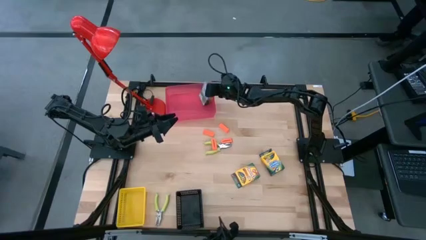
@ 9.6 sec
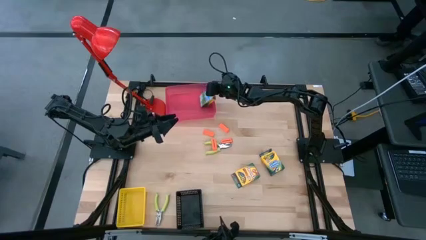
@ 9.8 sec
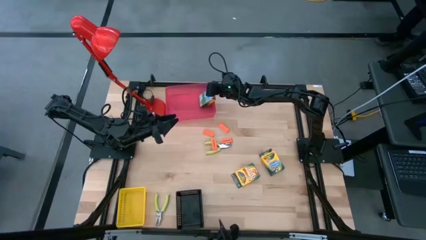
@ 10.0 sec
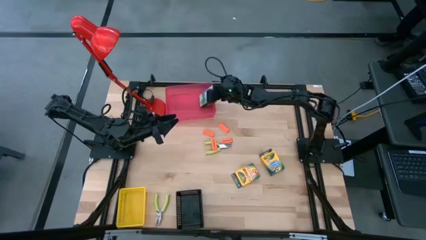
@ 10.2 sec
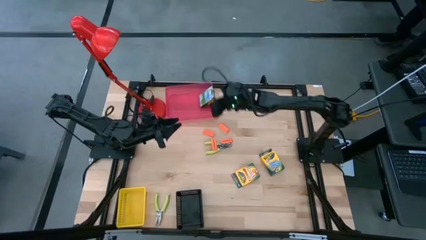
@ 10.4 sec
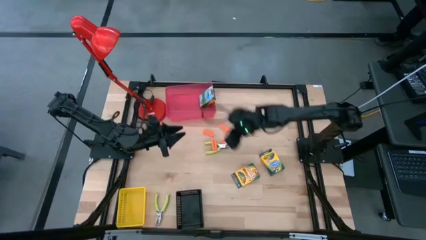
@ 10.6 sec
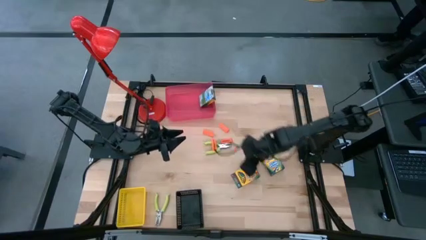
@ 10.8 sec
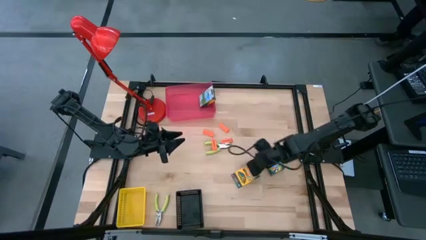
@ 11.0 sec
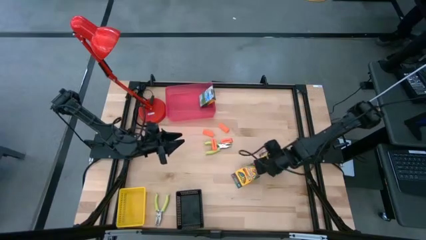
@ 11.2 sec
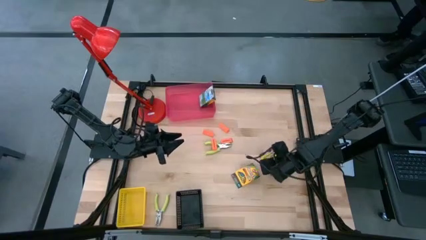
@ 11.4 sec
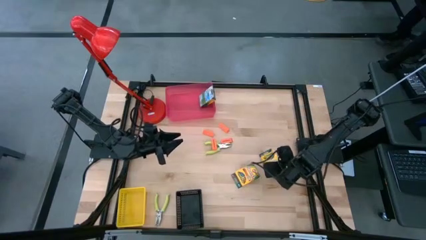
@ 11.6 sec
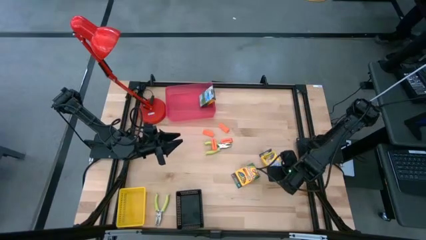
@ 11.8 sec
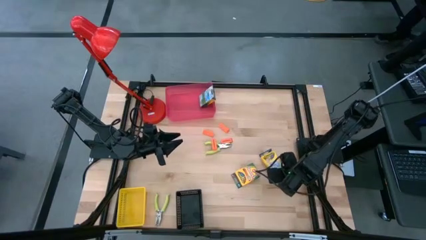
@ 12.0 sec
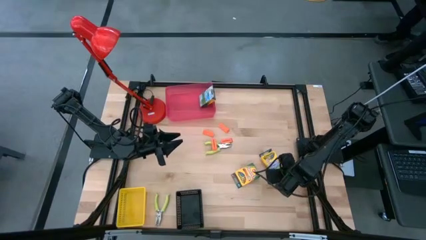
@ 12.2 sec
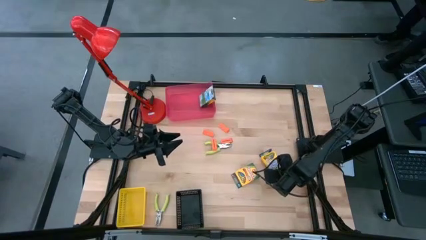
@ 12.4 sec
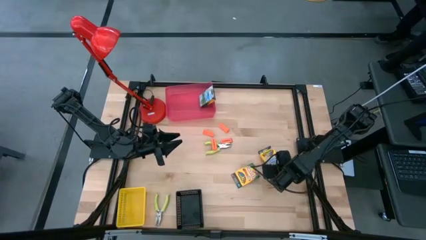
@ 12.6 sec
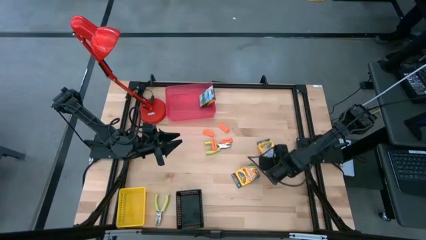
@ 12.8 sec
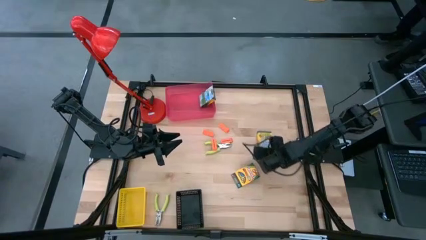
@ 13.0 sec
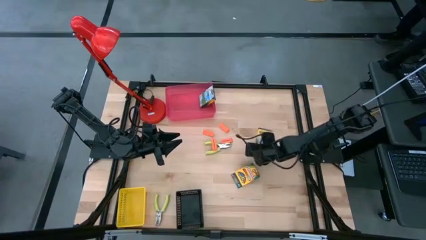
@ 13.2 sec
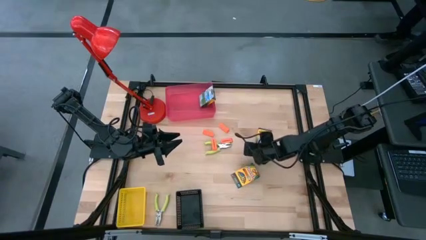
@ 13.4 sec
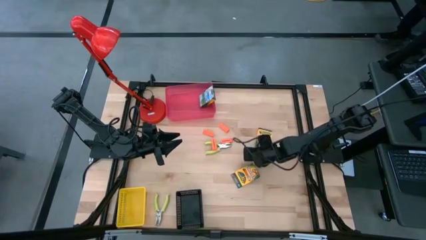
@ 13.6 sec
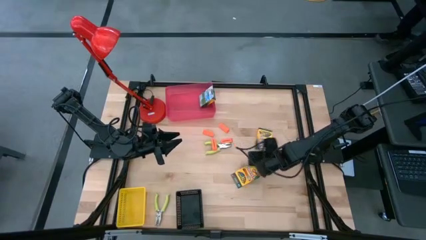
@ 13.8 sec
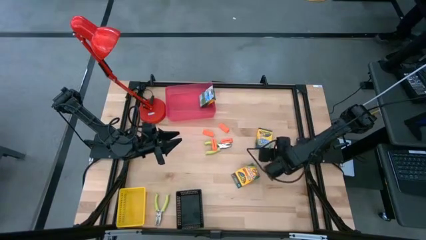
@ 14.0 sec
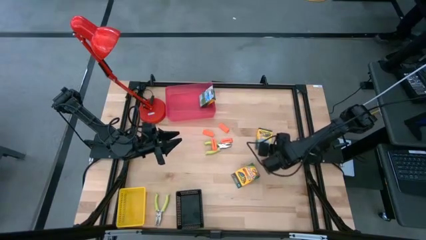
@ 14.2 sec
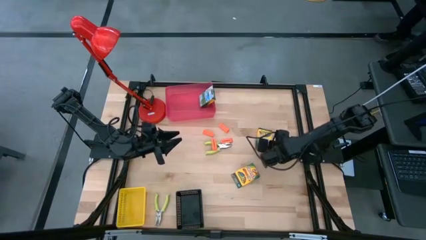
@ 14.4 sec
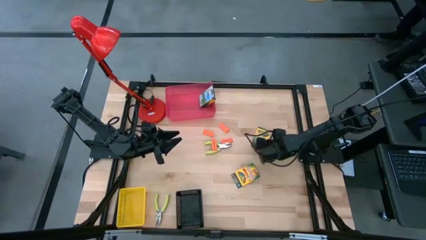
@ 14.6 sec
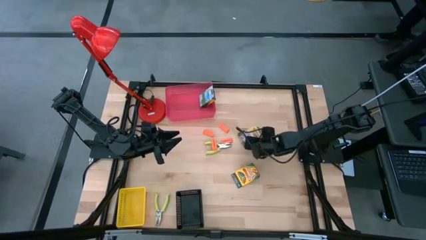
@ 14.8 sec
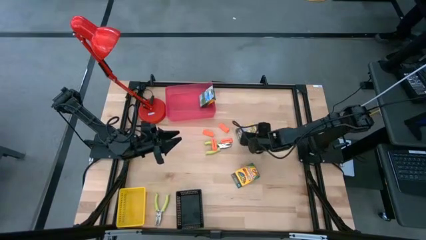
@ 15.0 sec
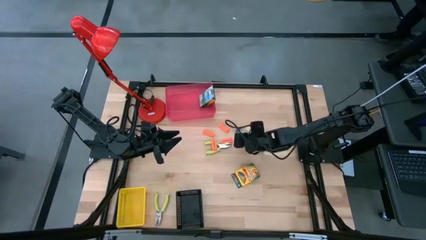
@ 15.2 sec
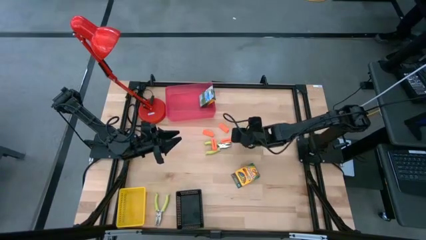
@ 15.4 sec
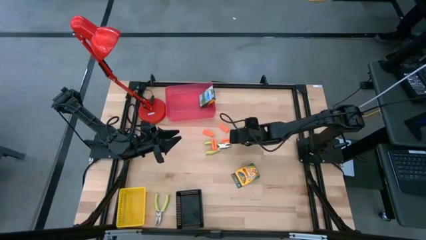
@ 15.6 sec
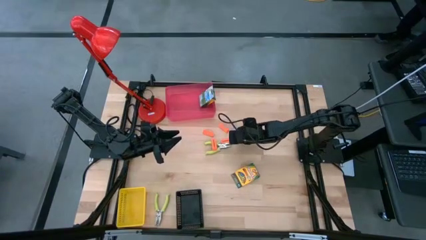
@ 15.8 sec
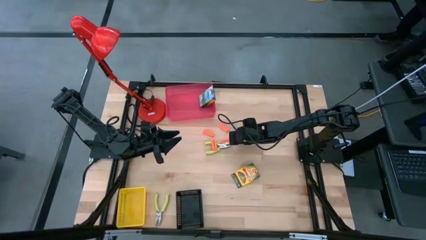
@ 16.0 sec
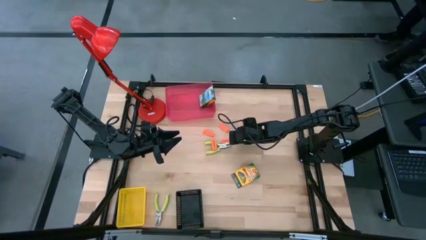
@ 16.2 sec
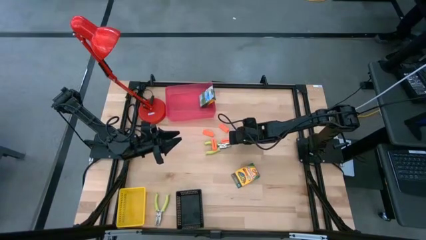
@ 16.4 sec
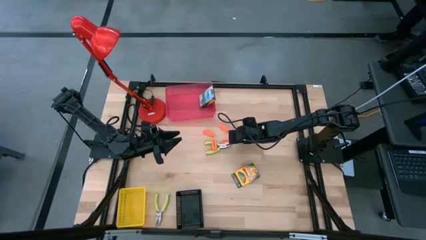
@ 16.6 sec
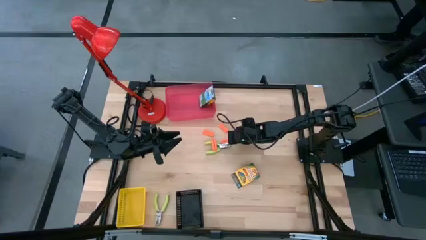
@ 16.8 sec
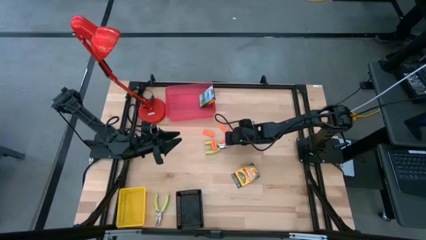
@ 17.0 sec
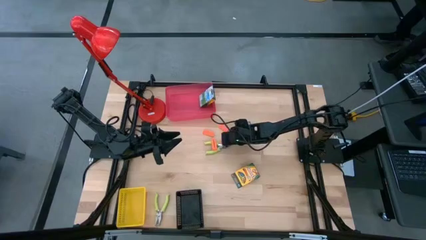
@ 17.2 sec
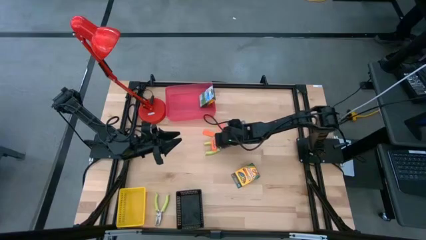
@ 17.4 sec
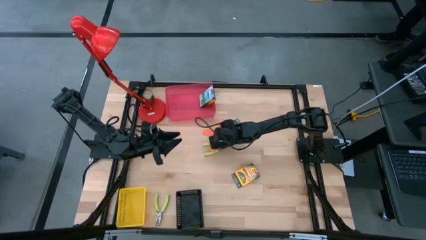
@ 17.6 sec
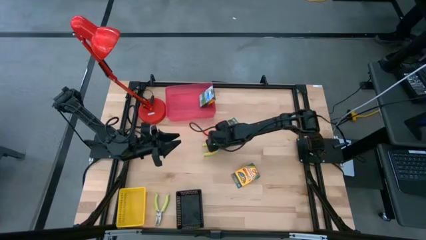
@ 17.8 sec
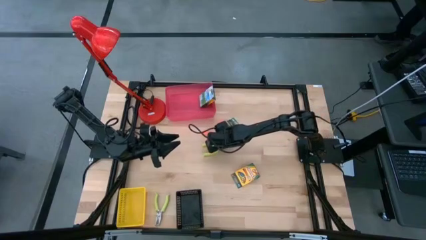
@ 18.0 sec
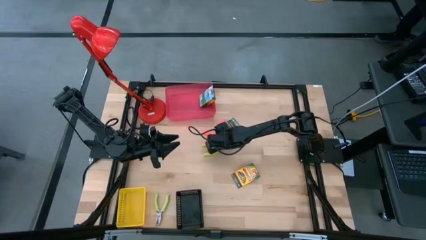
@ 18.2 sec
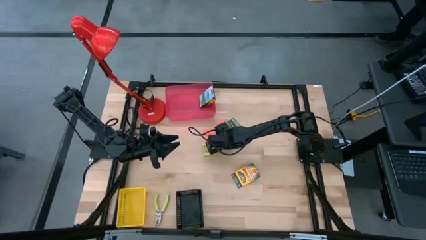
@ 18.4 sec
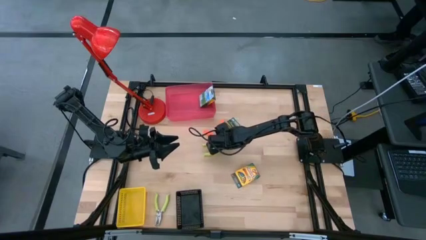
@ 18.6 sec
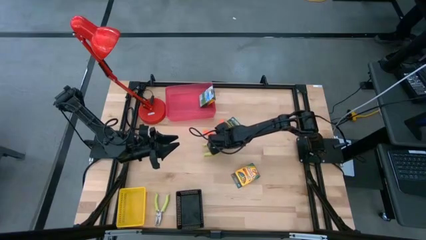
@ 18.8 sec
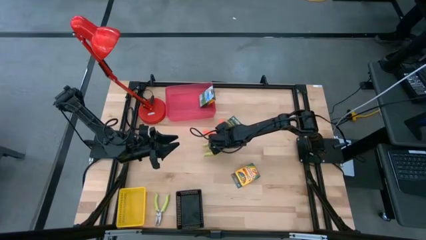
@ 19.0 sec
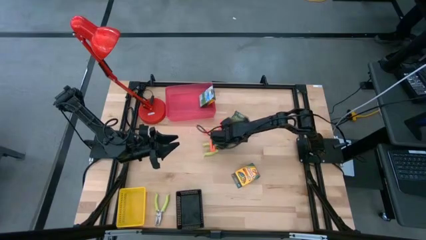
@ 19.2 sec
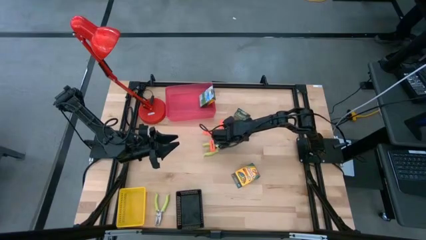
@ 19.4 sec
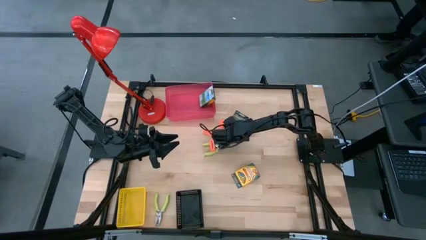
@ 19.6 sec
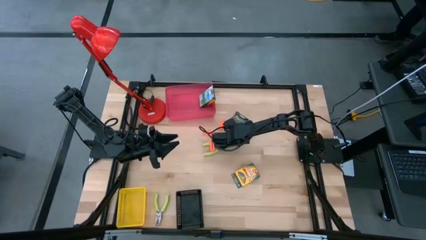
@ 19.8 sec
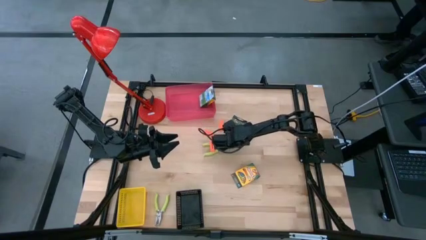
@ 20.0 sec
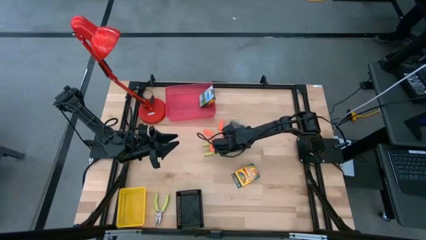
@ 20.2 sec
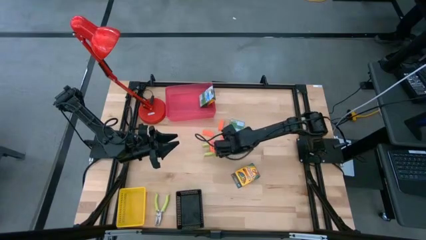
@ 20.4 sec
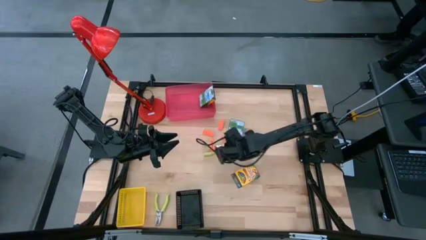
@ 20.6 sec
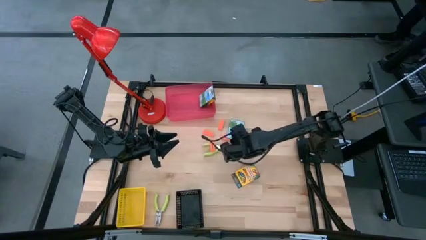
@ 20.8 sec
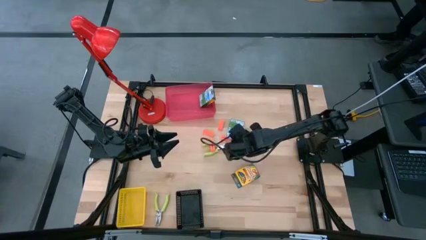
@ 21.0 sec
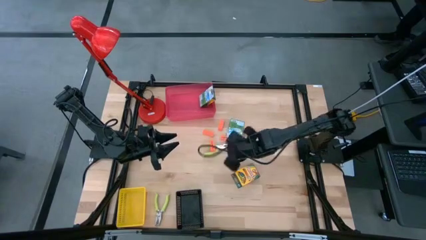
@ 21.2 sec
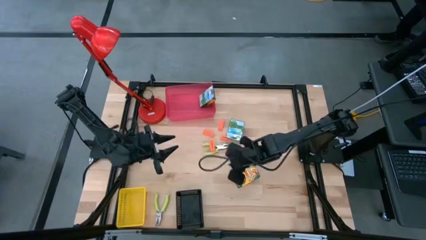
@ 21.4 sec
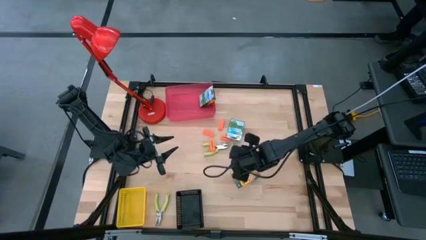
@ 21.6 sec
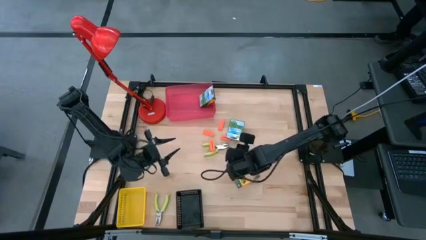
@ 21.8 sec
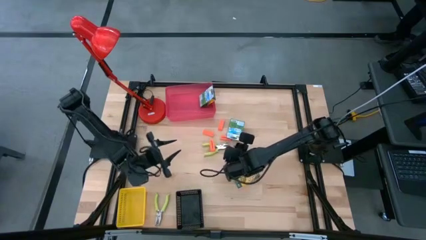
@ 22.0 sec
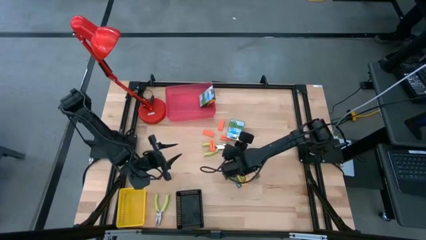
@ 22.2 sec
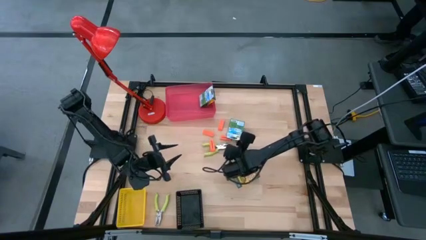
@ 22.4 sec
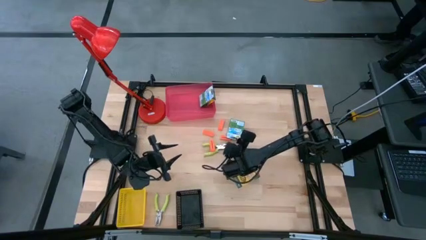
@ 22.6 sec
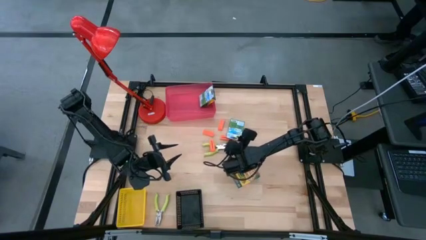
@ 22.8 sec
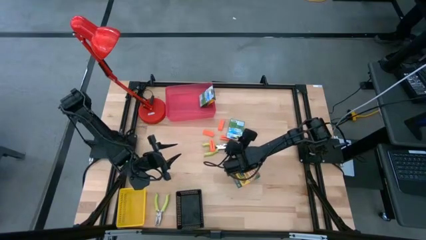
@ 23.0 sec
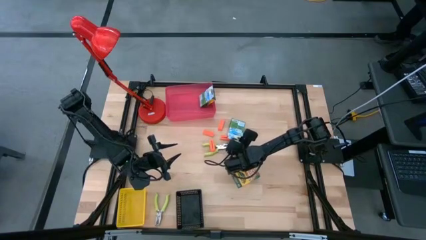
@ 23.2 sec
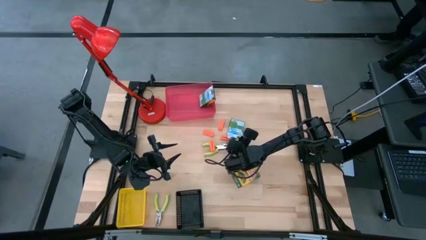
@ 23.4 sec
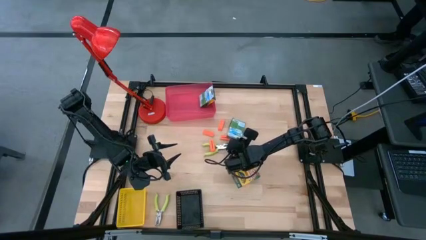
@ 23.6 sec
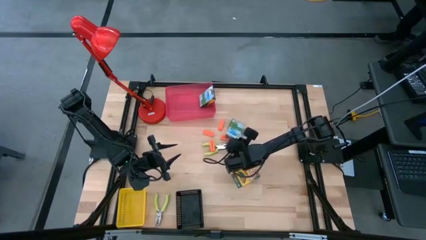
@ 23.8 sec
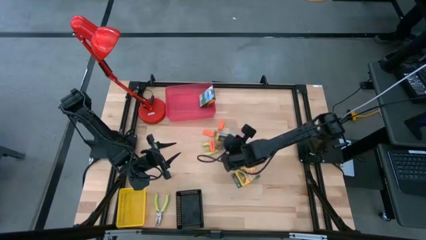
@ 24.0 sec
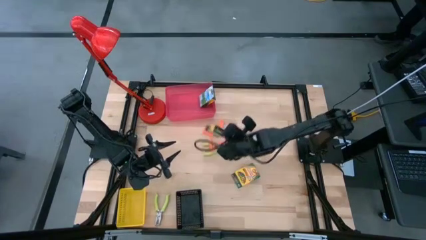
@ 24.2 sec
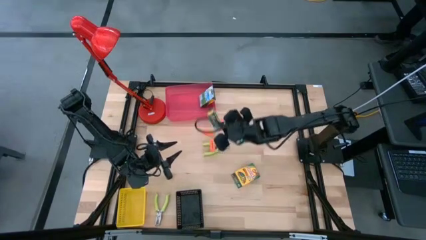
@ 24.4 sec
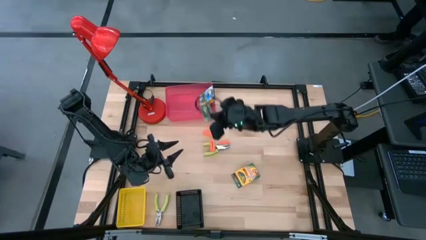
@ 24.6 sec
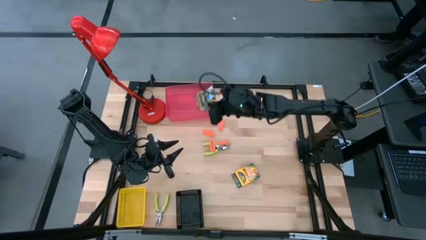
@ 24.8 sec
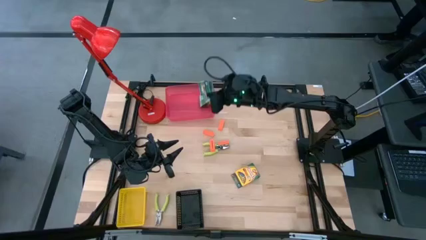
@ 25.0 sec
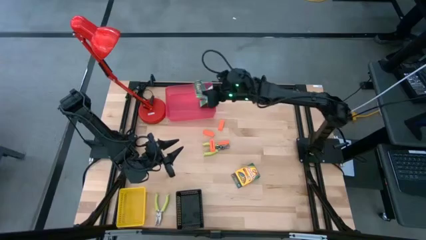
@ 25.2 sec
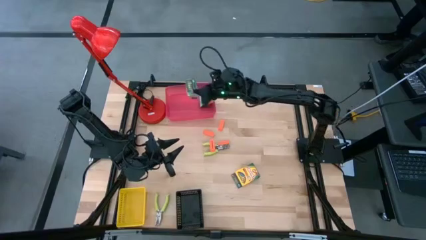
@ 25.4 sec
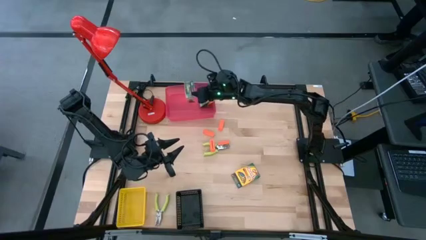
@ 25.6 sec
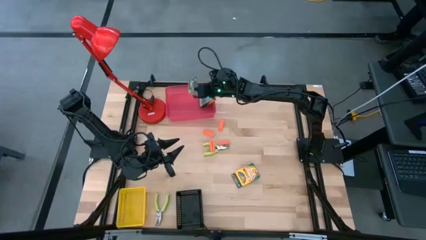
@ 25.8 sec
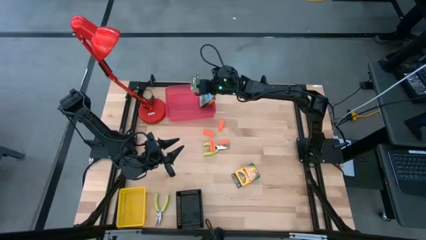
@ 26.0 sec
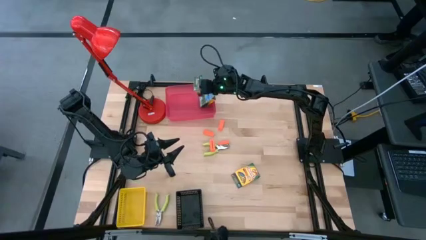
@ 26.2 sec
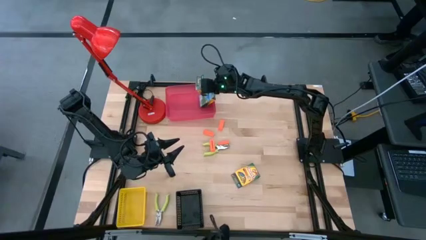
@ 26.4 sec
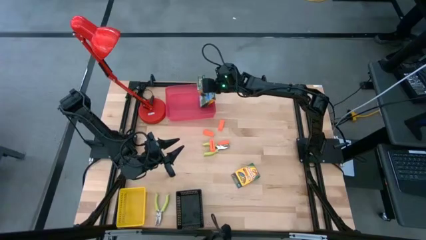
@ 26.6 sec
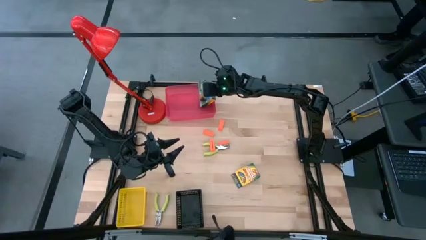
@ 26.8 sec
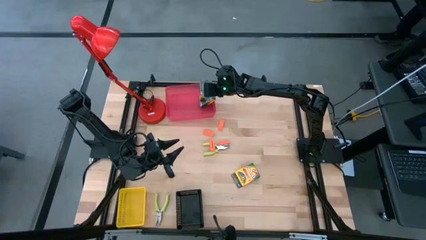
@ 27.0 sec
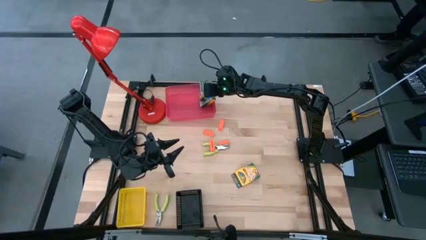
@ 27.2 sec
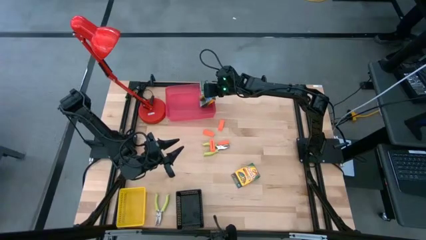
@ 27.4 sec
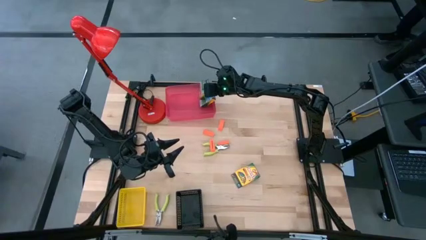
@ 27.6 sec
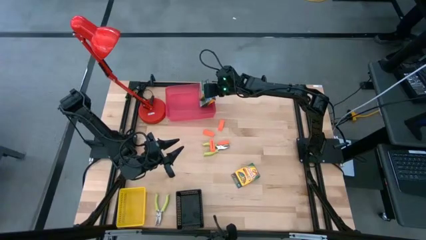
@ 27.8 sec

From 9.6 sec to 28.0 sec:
Task: Pick & Place School Supplies
Put the crayon box into the red bin
